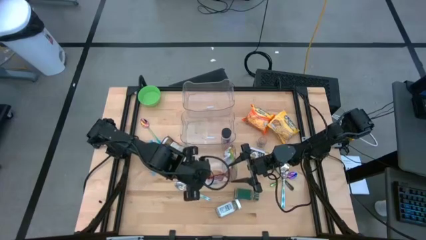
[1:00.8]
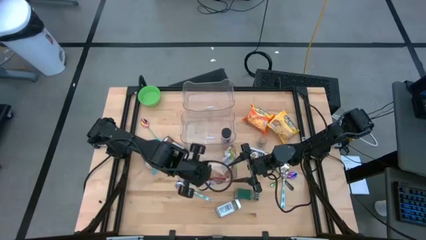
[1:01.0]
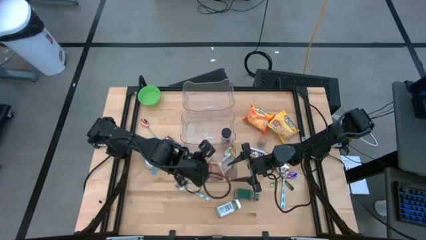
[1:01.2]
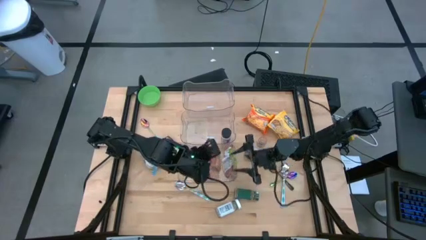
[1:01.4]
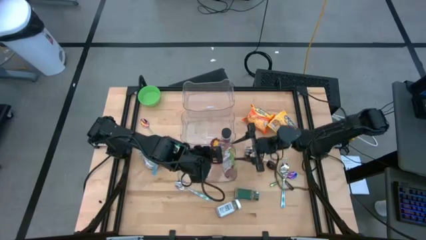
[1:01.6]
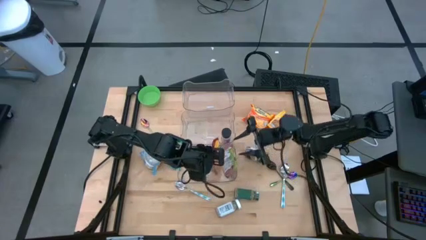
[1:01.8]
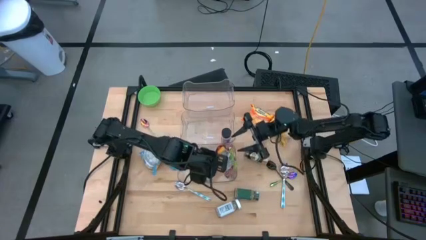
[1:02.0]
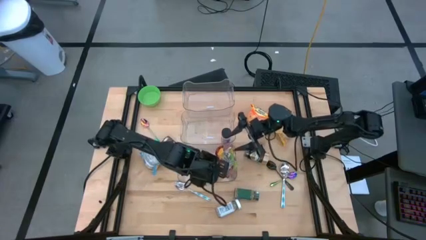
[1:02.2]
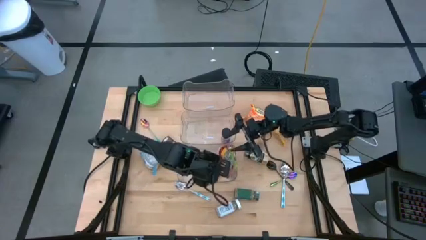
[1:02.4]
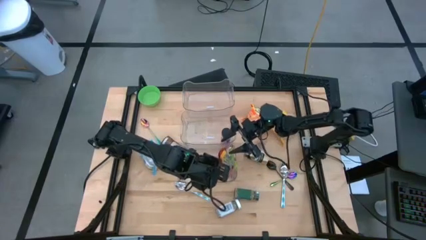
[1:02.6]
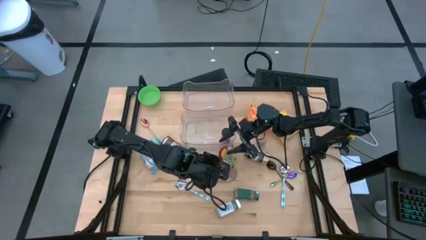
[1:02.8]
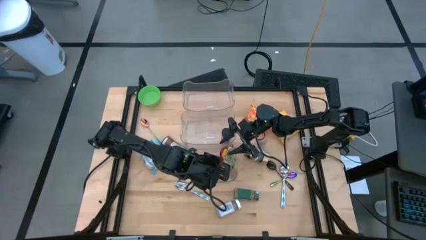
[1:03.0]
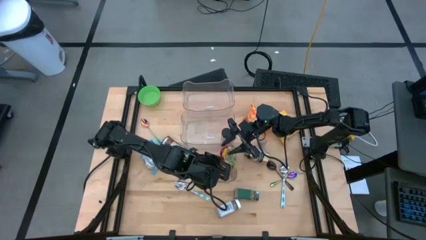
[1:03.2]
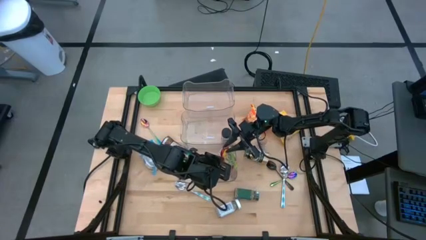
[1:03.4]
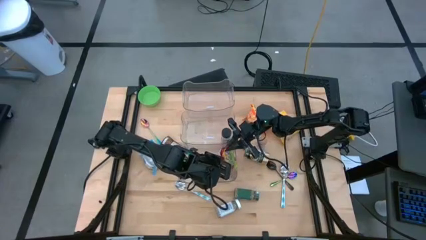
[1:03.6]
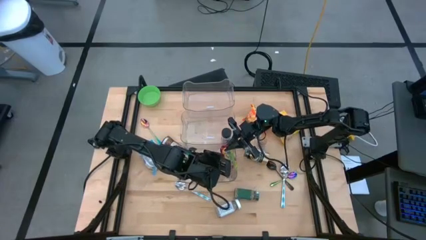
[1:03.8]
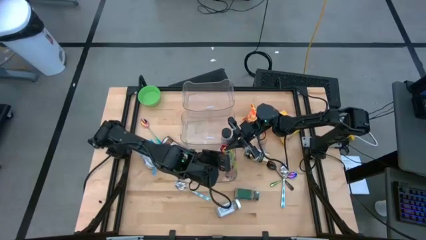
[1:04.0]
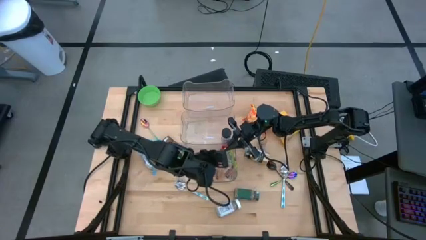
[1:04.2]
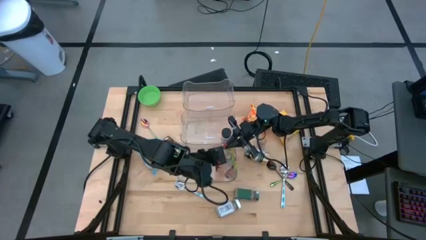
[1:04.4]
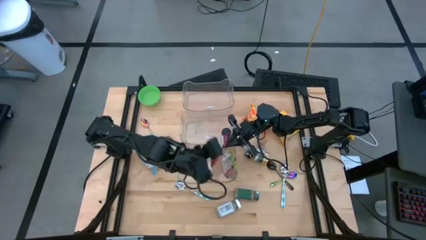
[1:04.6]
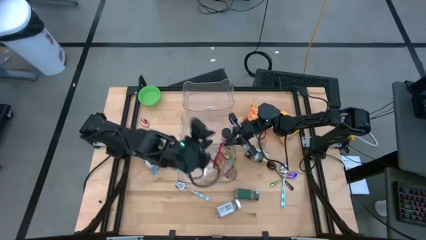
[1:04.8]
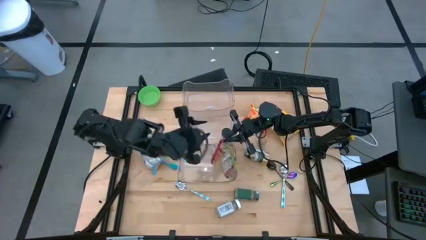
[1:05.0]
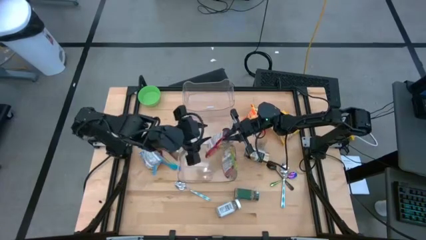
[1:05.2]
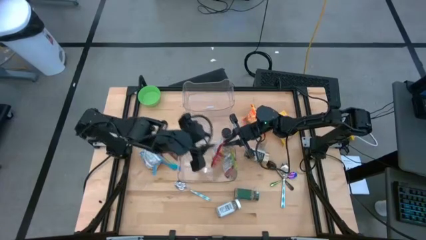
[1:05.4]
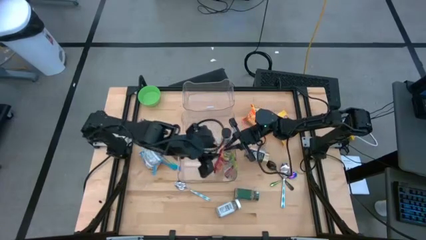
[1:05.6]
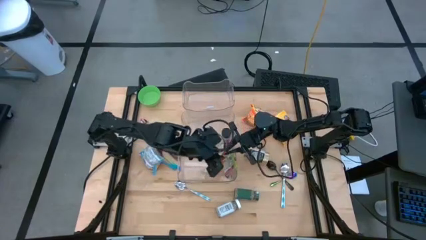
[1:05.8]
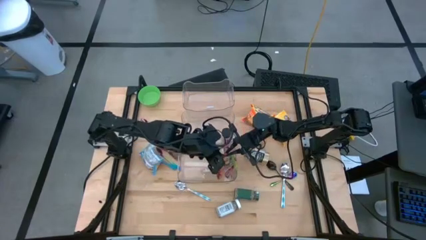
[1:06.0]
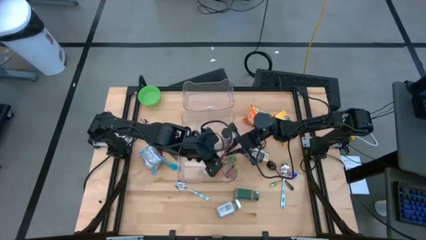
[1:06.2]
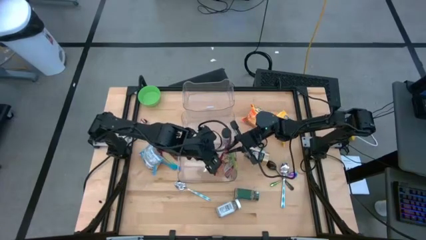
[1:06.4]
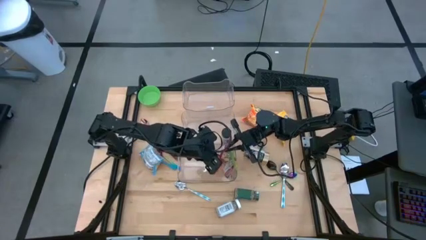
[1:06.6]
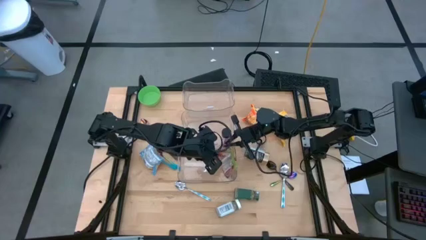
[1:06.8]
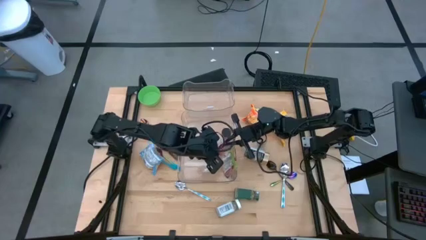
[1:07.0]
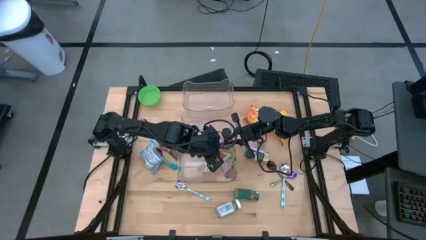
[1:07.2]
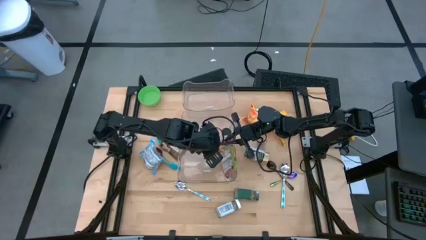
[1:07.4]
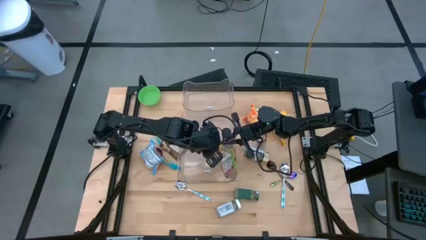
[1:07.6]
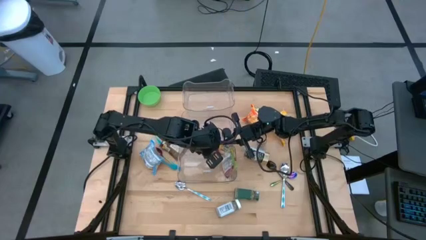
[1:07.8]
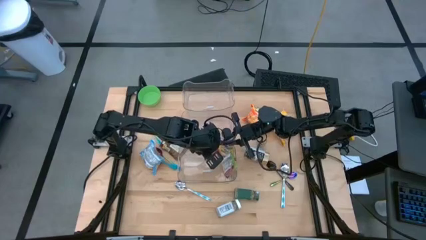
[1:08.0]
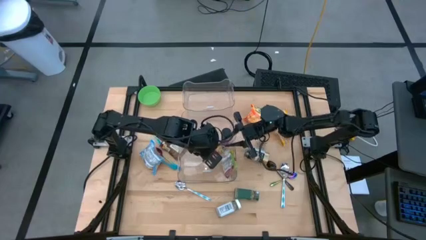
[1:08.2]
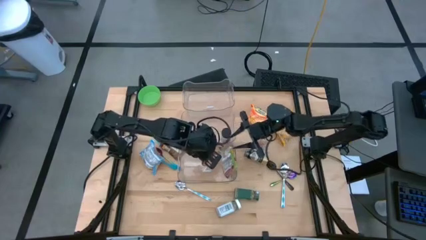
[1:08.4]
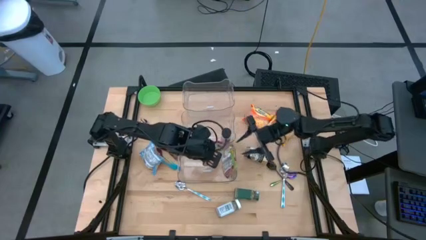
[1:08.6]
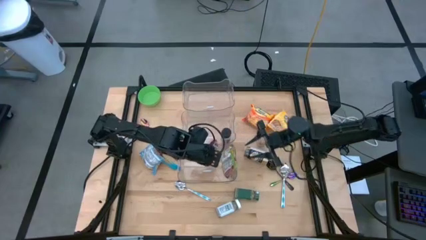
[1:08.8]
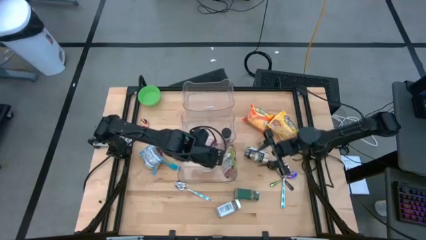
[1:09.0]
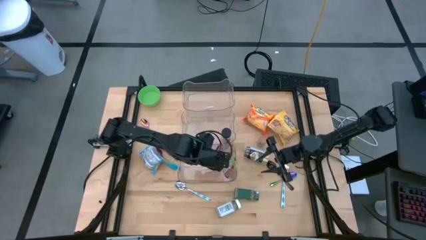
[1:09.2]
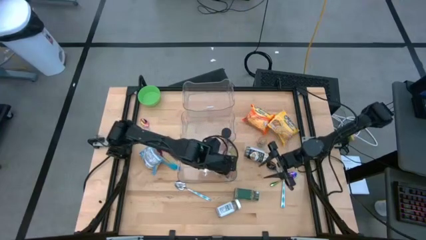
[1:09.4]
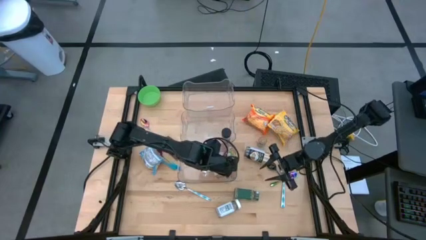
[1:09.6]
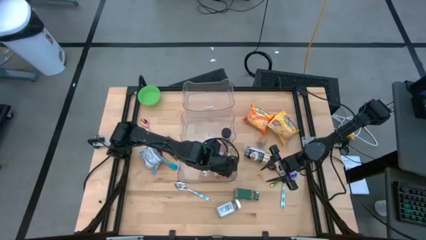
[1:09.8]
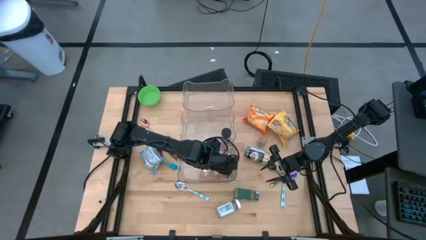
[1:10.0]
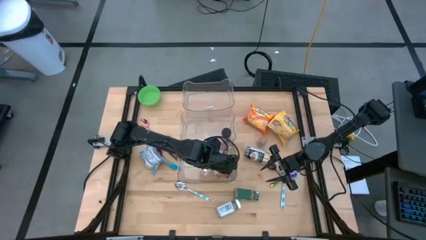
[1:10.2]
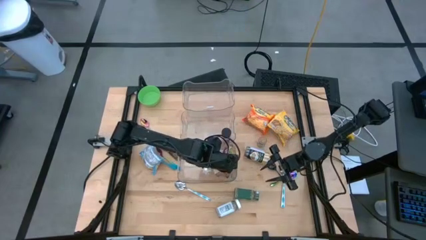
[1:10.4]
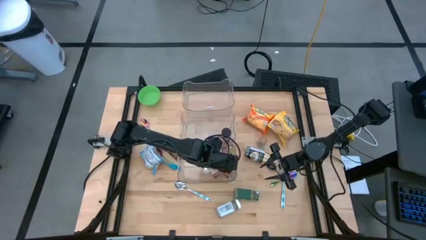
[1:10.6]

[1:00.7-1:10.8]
Task: Pick & Place Food Item
Put the red noodle pack into the bottom transparent bin

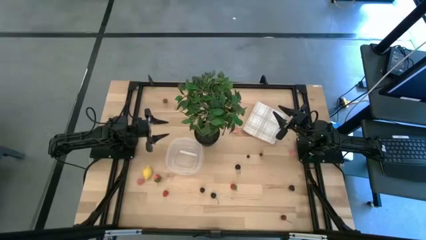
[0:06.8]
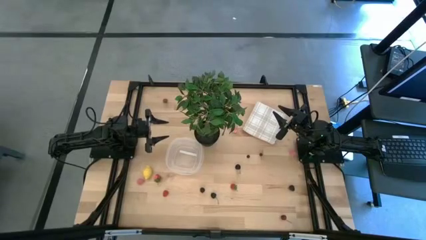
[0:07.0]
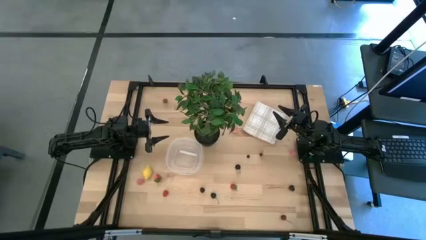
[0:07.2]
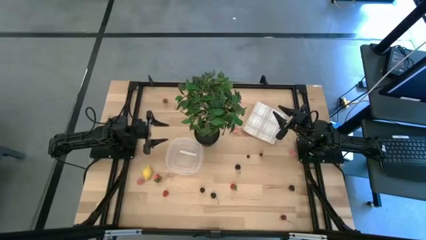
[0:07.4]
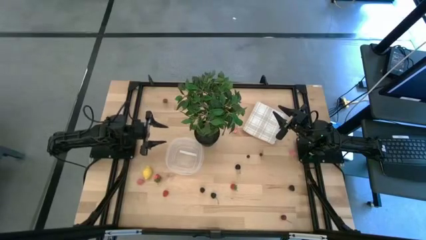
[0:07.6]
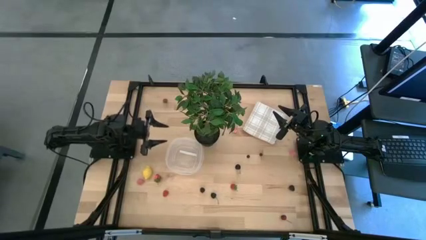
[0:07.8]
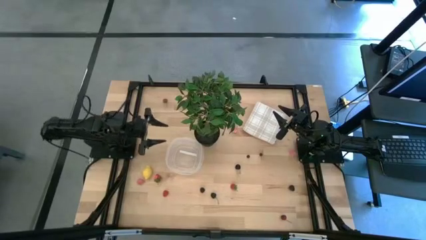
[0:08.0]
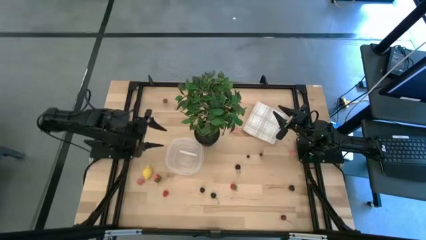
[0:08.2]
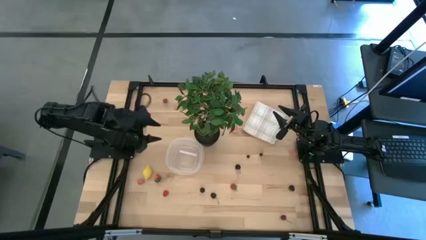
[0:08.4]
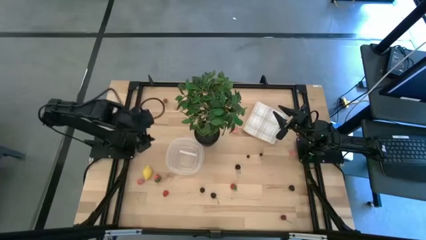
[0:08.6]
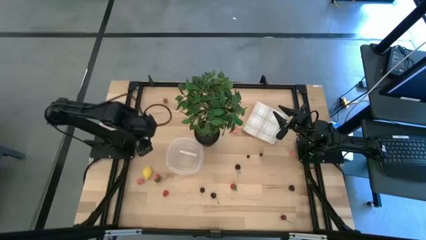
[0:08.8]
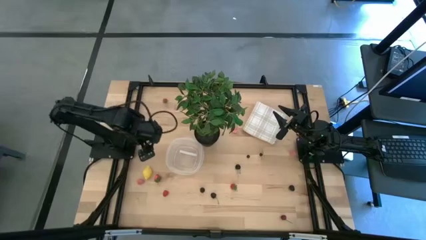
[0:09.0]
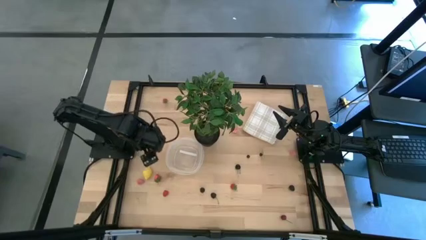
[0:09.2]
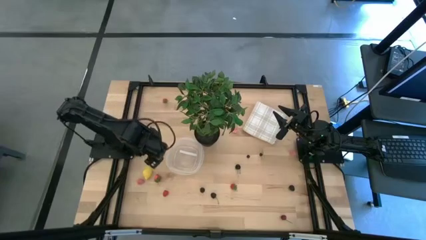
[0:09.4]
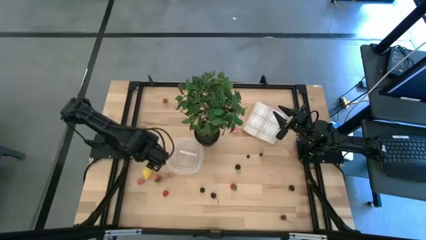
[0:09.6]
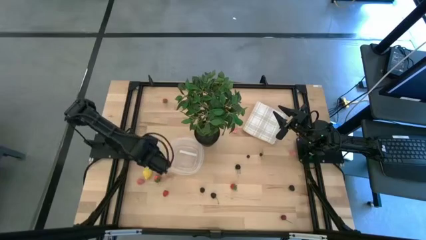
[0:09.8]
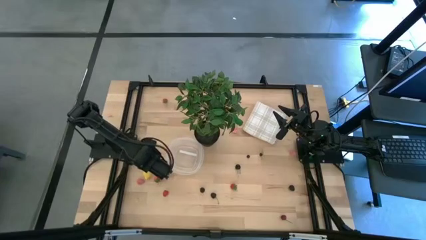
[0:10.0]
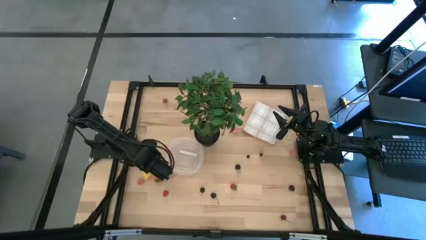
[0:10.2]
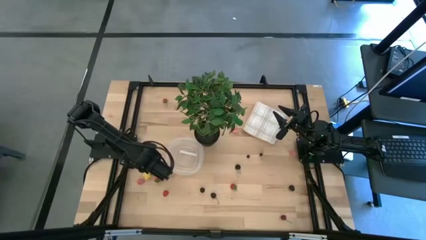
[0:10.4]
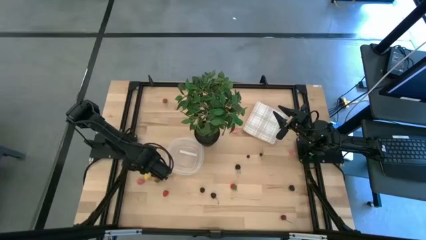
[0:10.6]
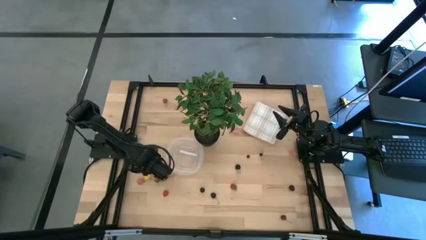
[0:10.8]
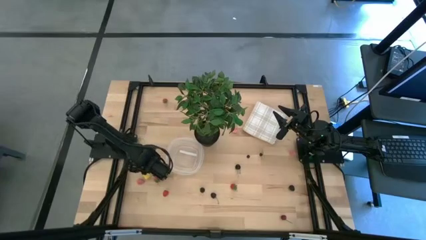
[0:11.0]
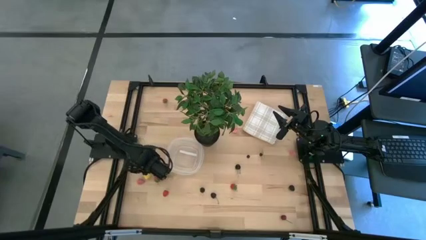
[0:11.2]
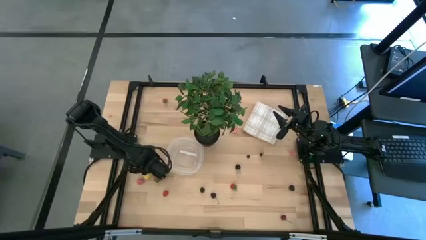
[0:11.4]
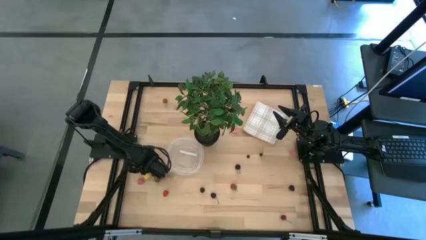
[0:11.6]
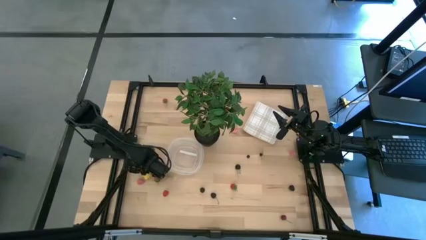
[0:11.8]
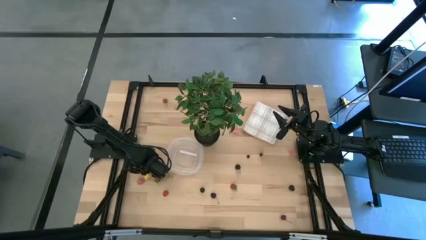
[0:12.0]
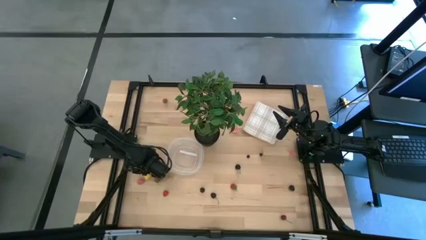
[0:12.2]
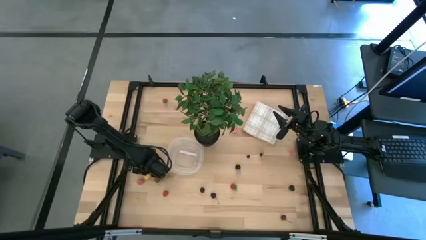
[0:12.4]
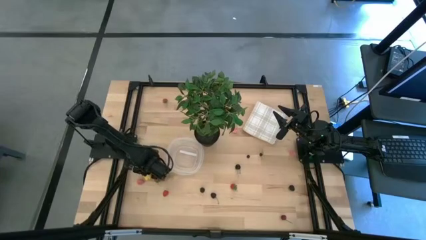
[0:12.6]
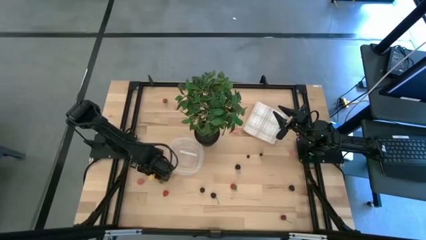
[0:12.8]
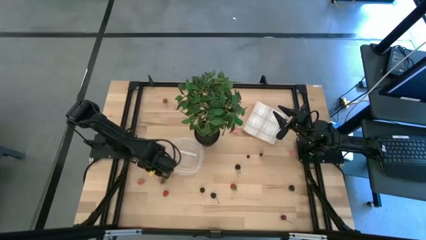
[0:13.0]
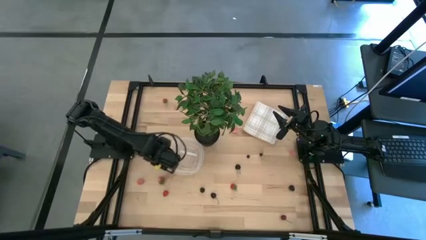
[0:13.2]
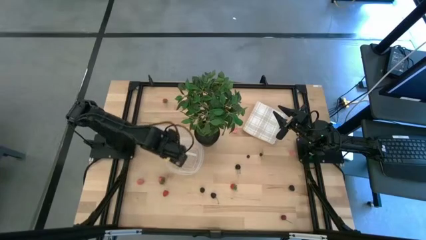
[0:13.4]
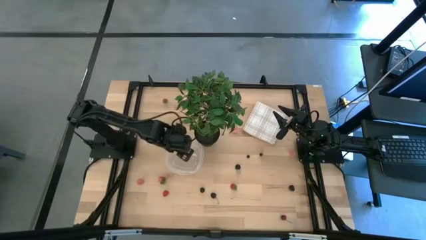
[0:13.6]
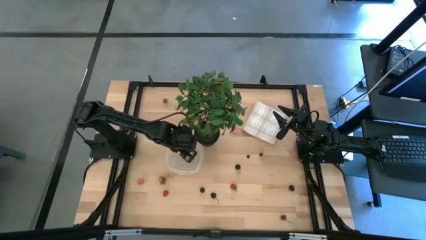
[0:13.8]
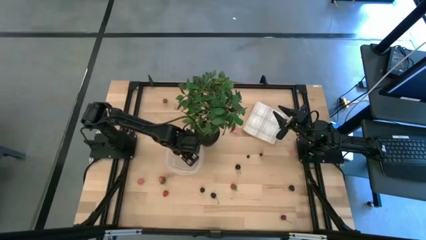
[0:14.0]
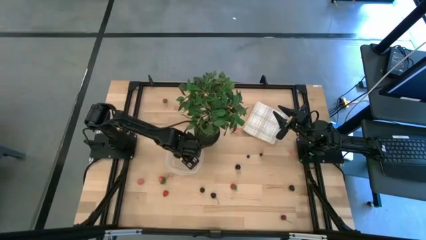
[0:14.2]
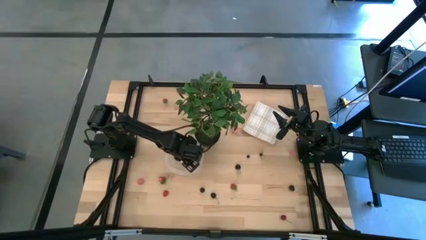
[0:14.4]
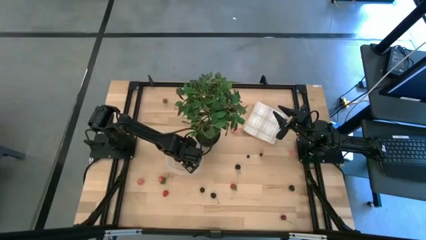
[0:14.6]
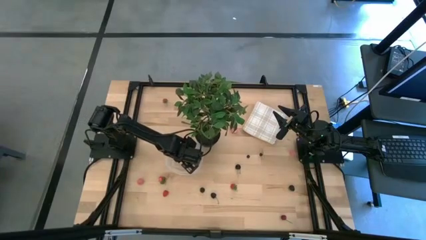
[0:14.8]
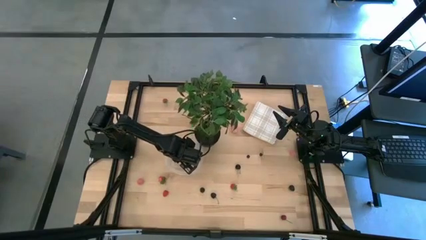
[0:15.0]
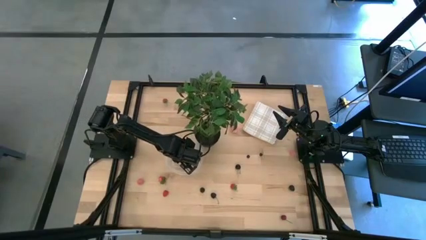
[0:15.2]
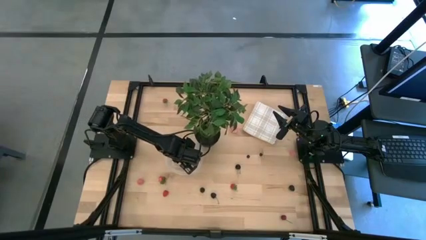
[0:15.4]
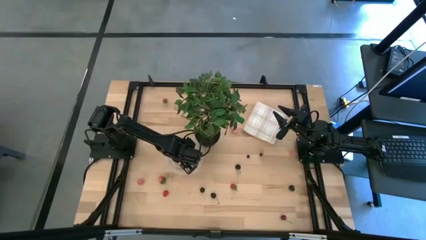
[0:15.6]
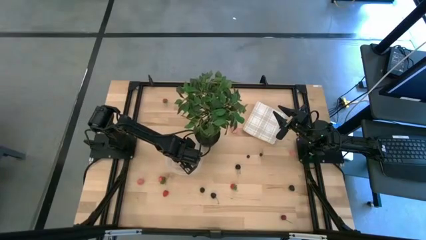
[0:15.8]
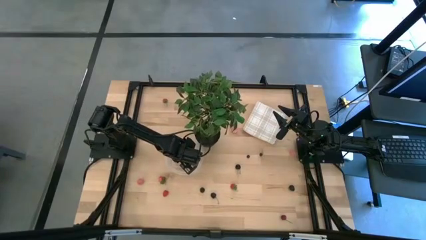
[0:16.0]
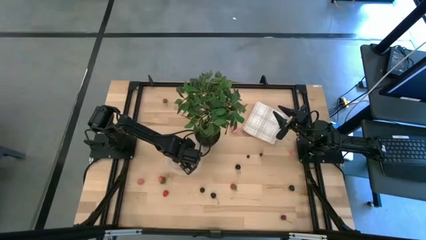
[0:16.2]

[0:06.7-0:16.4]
Task: Pick and placing Produce into tupperware
Put the yellow lemon into the transparent bin
